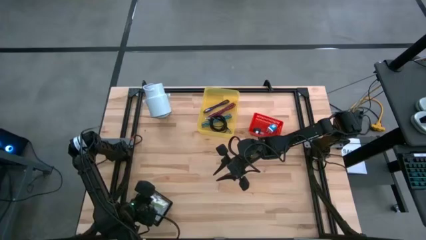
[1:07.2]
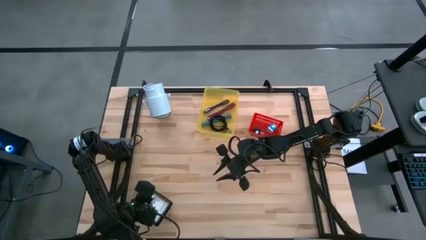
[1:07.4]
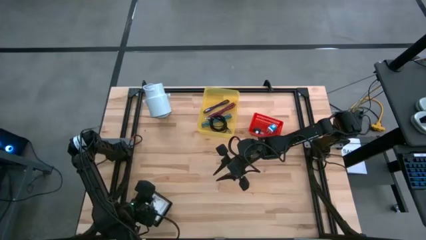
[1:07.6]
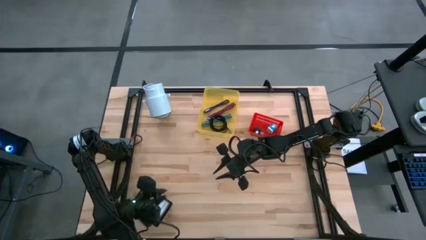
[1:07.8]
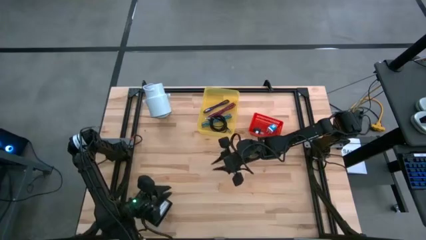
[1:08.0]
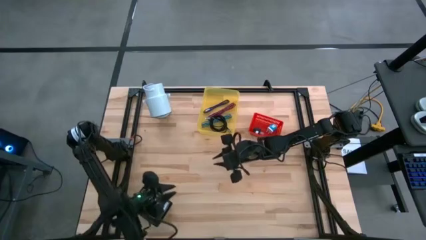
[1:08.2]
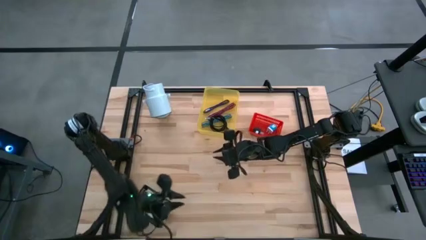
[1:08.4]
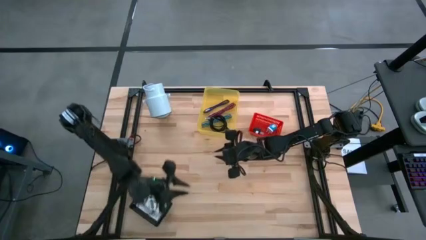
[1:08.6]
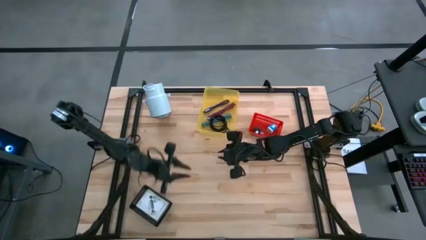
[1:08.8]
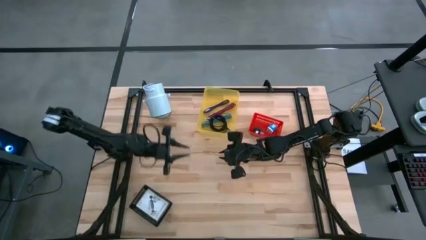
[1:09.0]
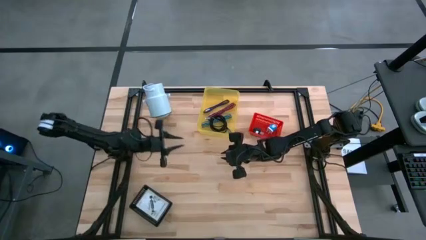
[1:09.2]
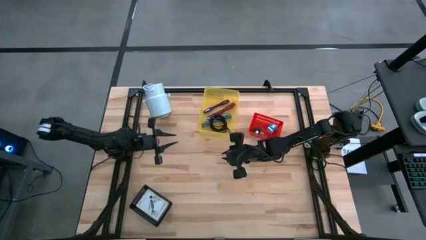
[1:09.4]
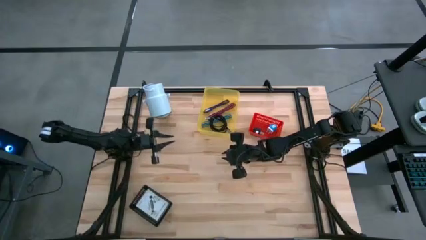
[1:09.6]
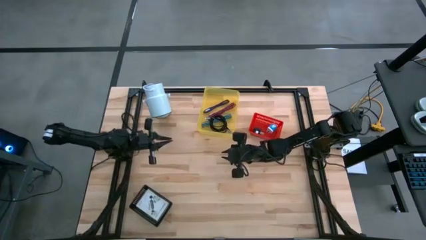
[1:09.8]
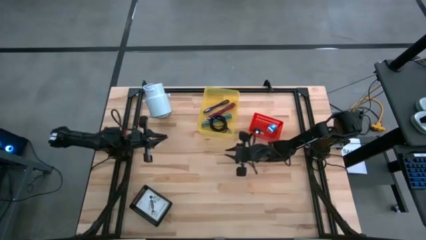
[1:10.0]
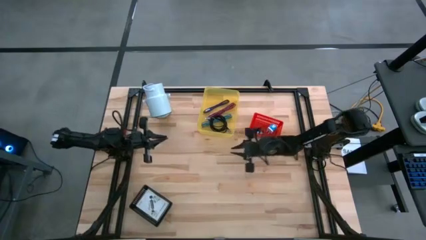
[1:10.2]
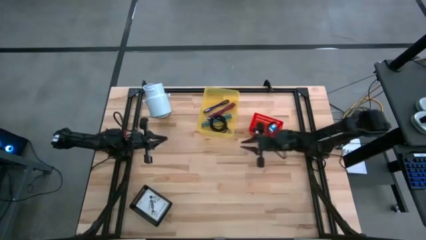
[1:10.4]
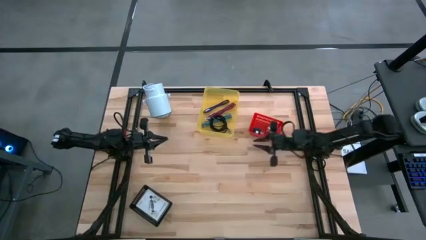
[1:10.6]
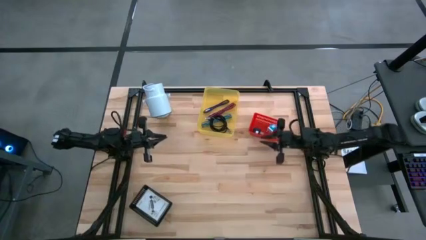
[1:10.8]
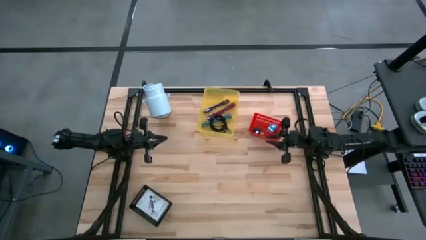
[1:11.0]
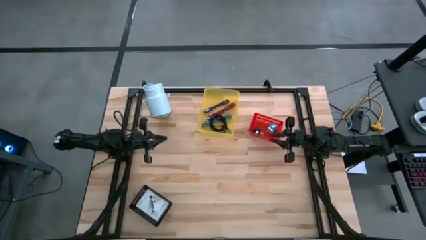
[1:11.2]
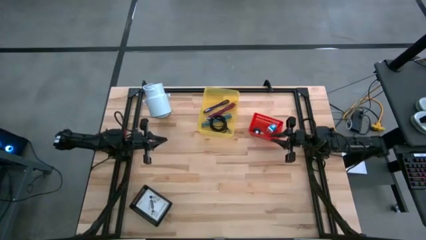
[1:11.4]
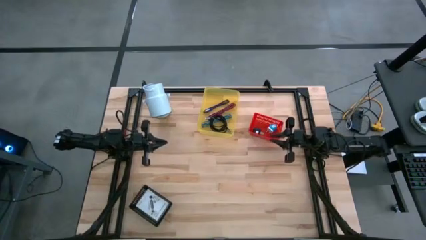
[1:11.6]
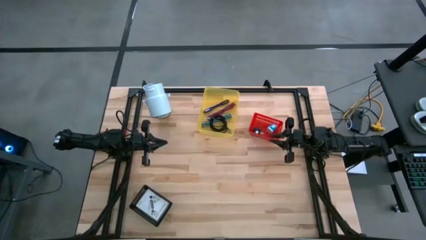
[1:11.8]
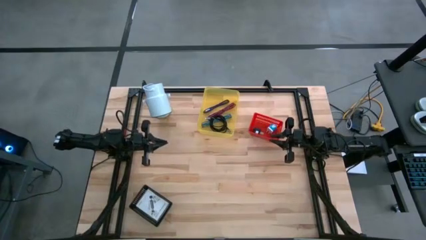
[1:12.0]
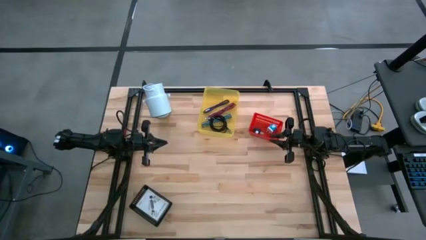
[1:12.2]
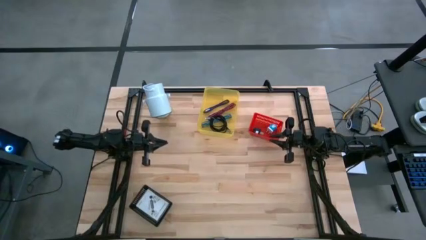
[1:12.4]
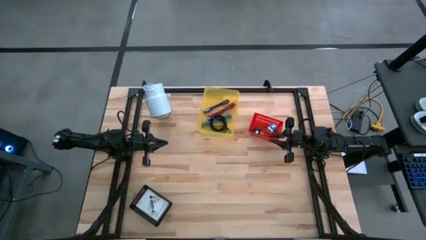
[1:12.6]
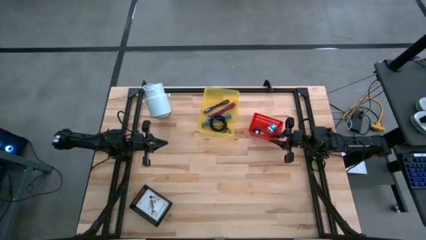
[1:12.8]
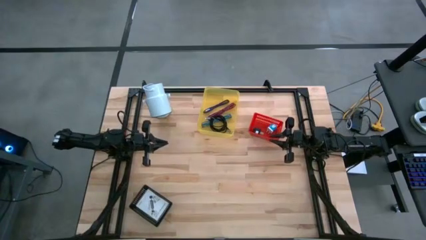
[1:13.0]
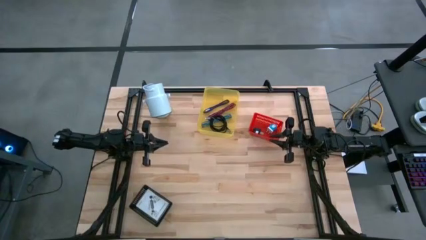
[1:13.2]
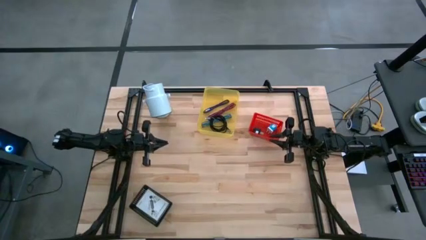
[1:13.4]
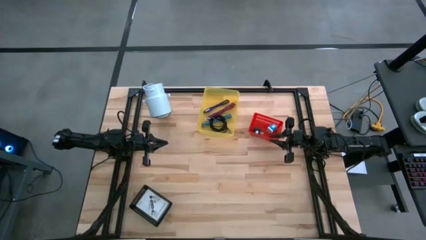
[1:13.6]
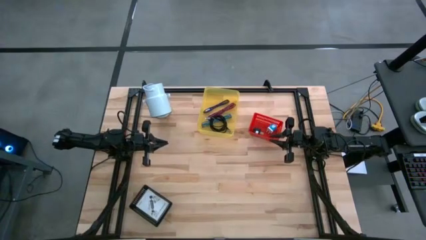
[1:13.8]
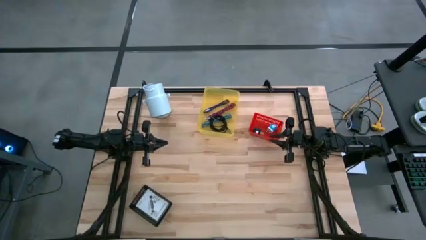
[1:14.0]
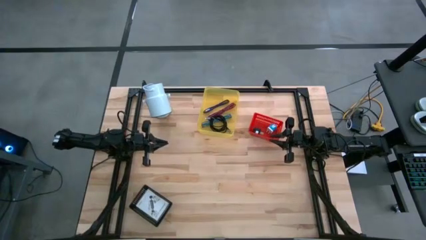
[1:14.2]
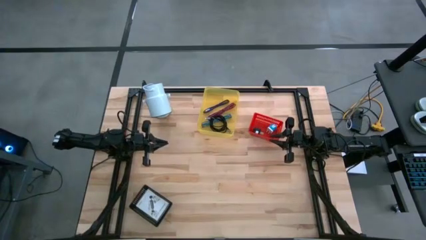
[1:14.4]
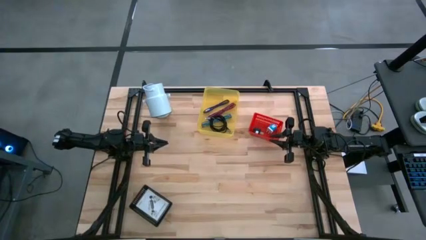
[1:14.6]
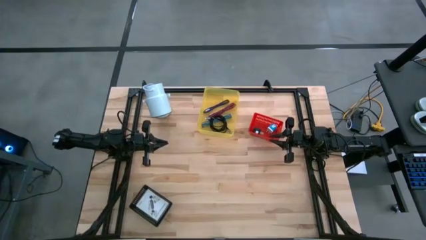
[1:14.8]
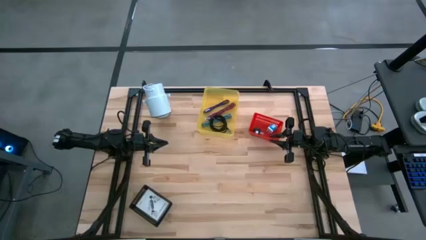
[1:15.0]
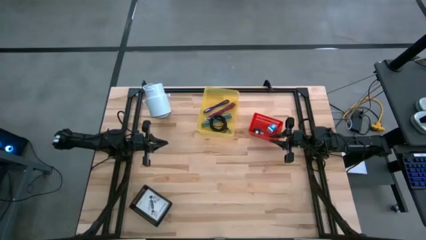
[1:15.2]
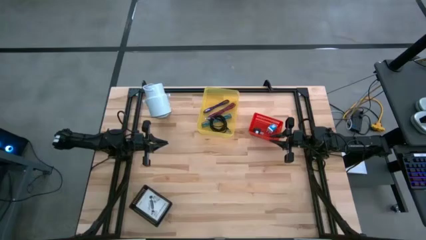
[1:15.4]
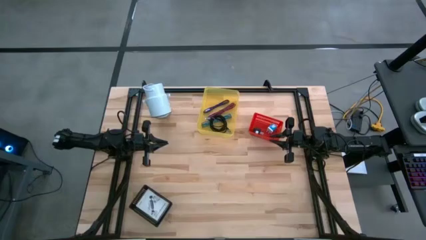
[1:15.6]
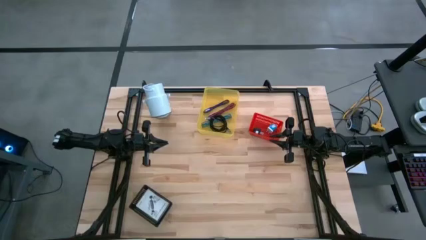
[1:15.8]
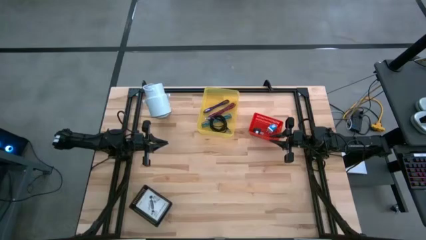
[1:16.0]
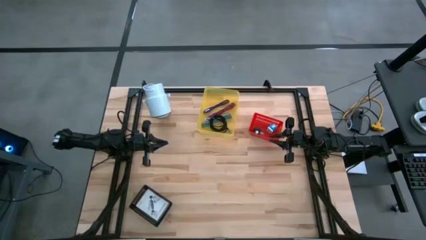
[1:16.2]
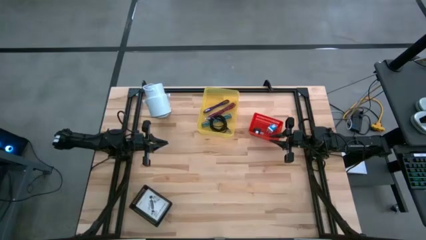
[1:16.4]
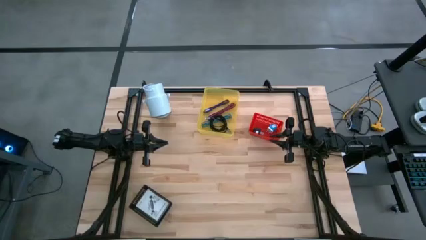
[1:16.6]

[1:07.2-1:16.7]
Task: Pick and place items into bin
Return to Home Position

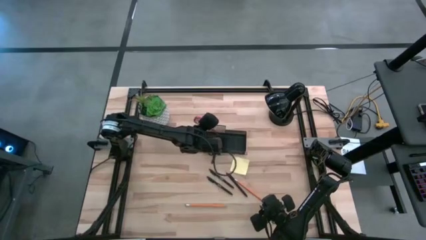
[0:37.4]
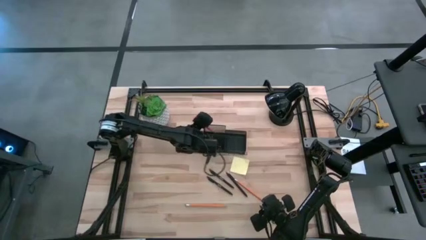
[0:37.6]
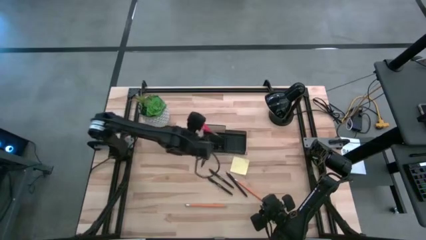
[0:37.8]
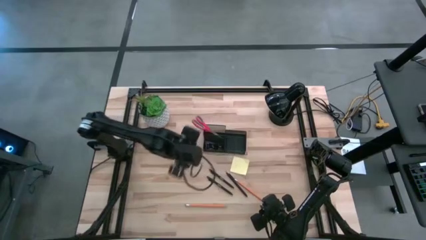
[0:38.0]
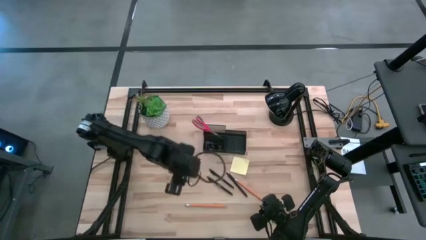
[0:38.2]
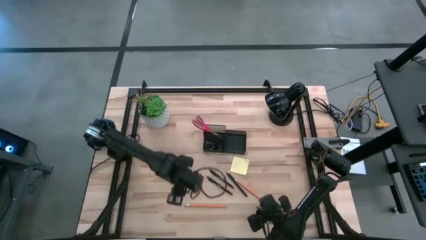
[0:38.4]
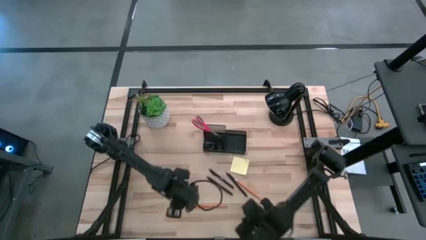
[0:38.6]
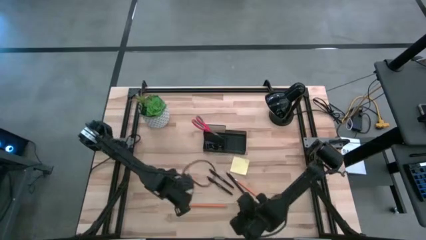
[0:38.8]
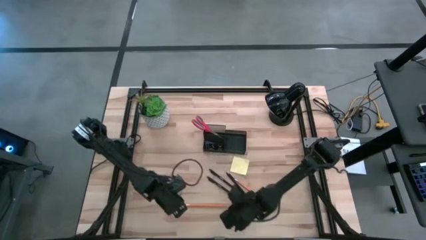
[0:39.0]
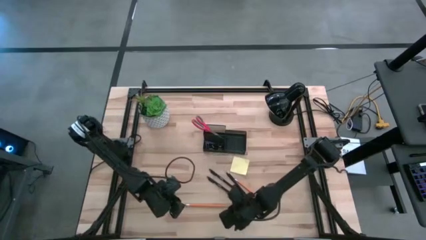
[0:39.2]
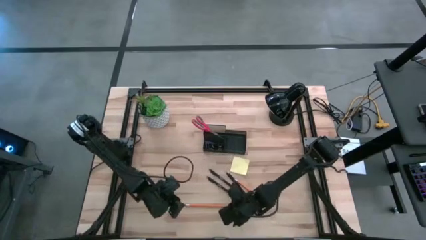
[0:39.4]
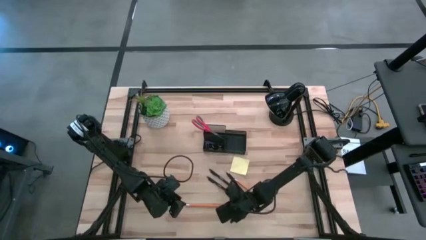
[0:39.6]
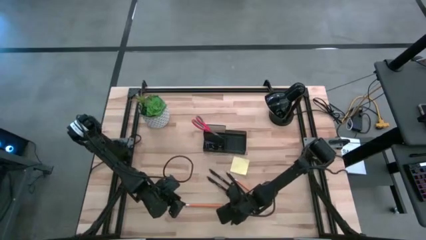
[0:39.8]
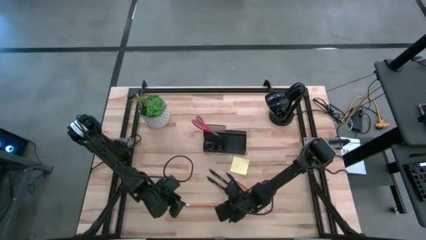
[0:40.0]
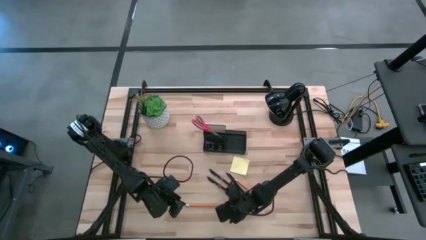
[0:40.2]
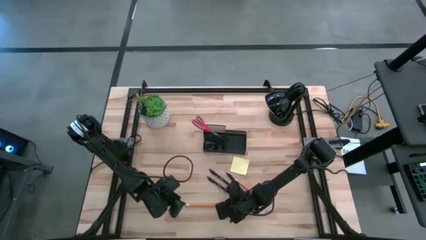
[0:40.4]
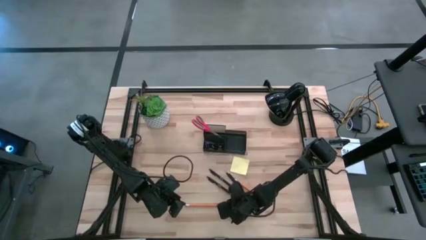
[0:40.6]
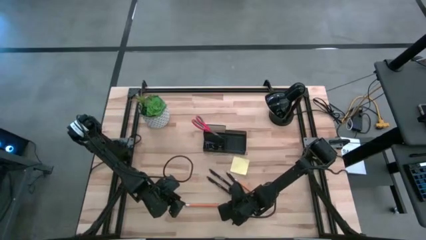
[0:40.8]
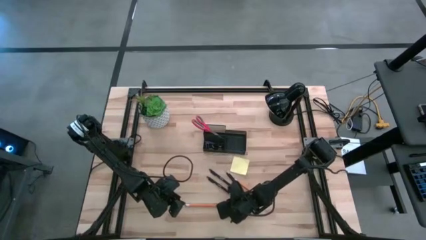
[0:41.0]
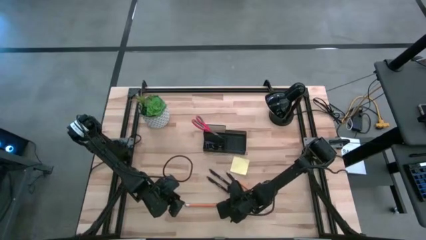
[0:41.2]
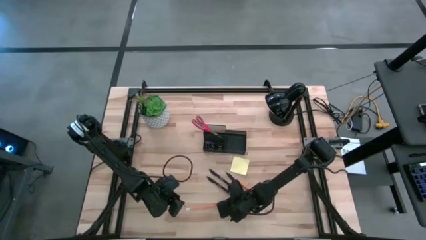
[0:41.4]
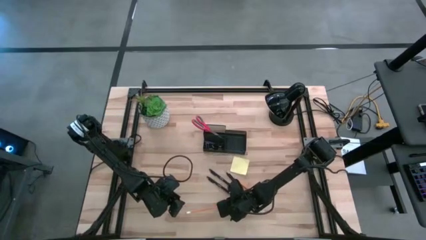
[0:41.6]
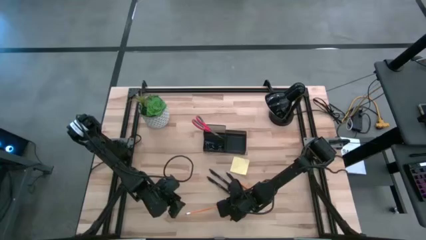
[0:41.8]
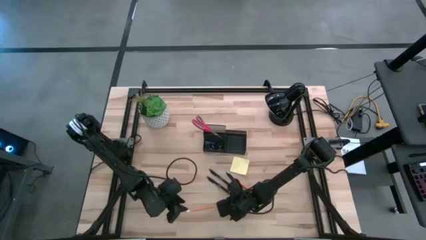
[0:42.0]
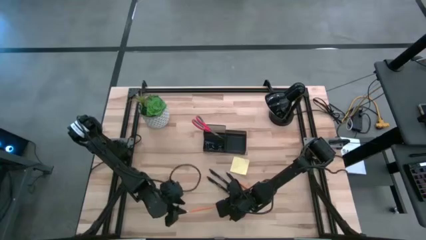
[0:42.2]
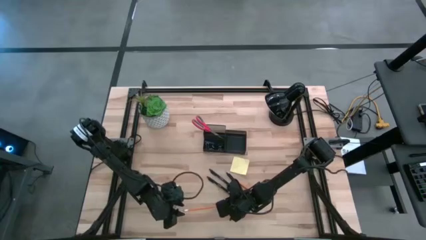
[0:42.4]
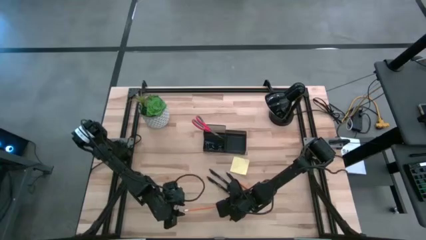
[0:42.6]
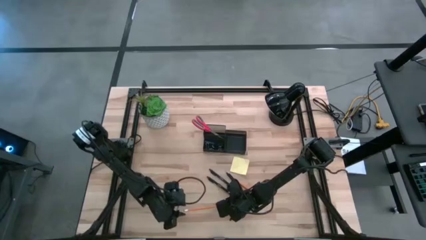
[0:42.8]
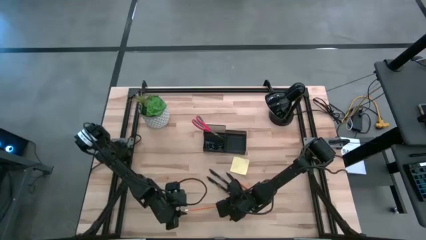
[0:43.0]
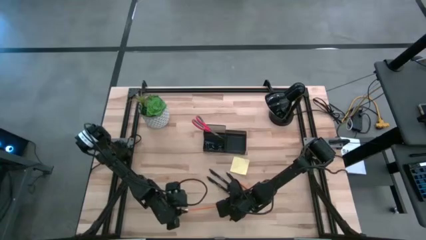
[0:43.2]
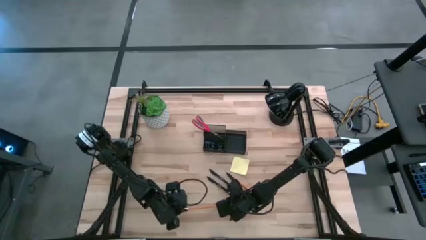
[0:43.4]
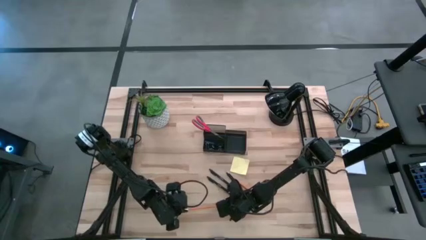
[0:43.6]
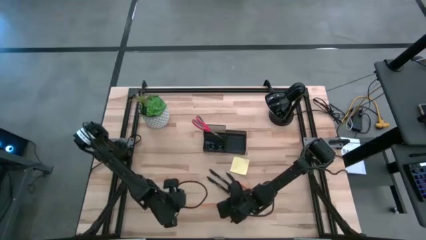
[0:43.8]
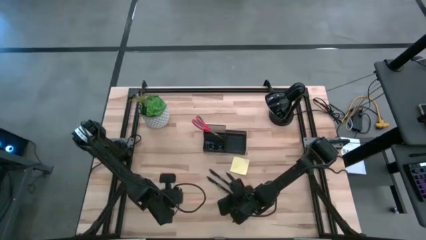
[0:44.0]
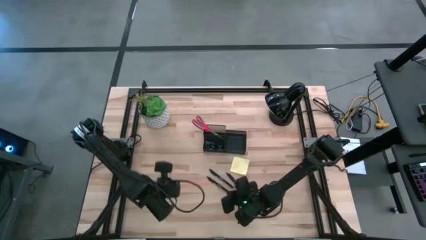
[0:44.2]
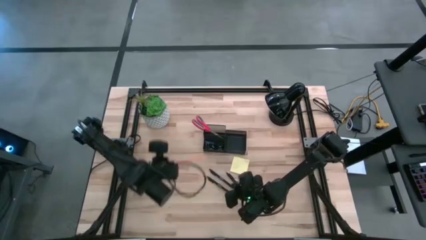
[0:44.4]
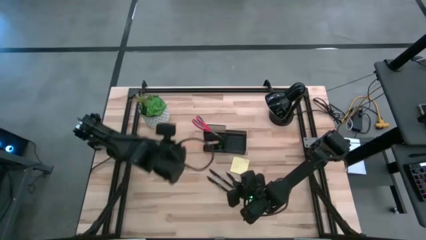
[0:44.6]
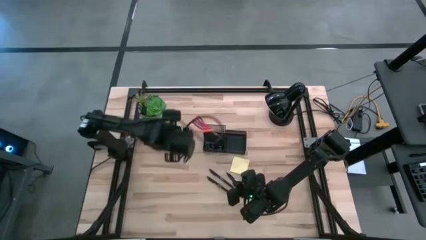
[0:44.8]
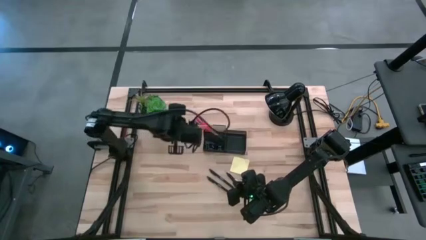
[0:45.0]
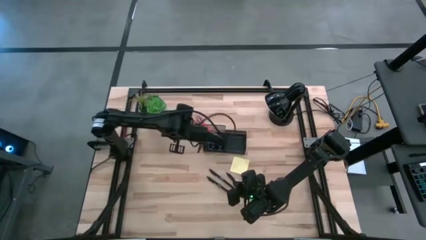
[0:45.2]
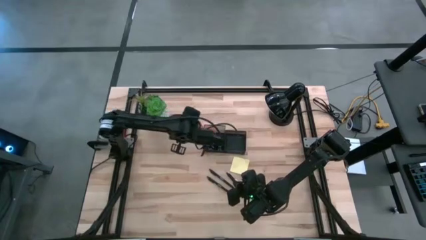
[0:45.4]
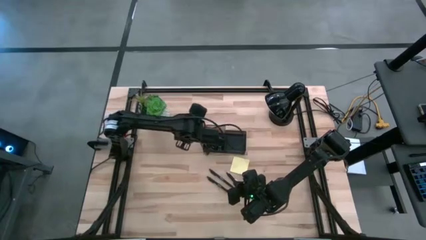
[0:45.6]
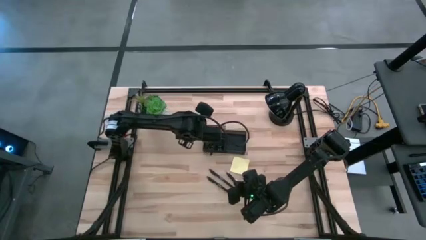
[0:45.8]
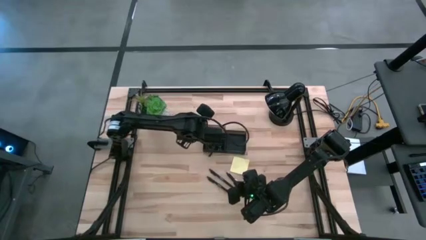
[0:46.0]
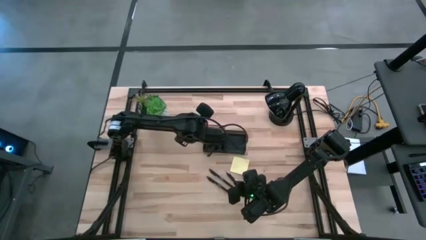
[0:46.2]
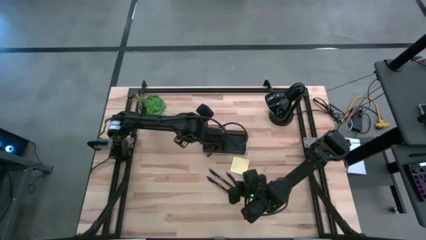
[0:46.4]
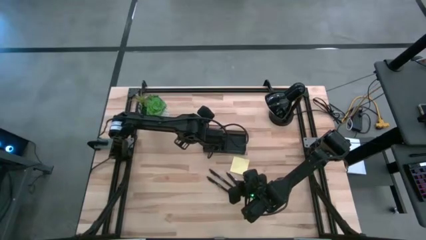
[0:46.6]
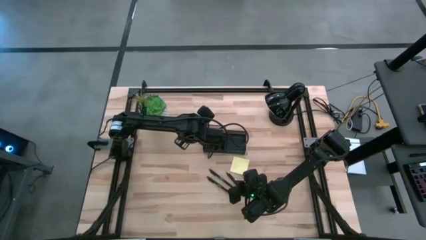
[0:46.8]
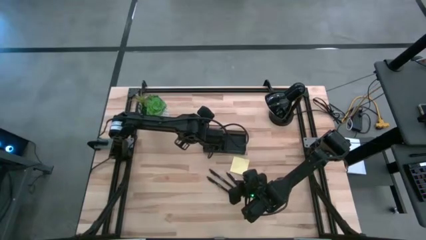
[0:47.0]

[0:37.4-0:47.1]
Task: Pick and place office supplies into organizer
Put the bottom left yellow pencil into the black desk organizer
